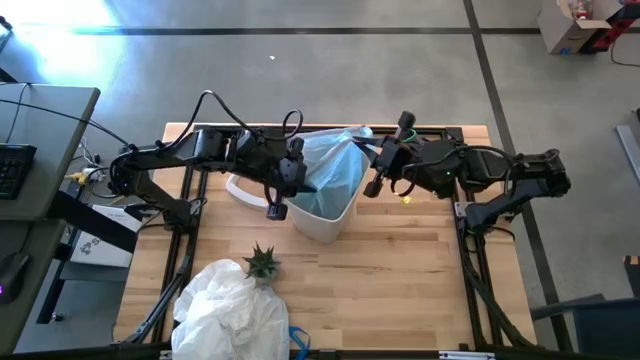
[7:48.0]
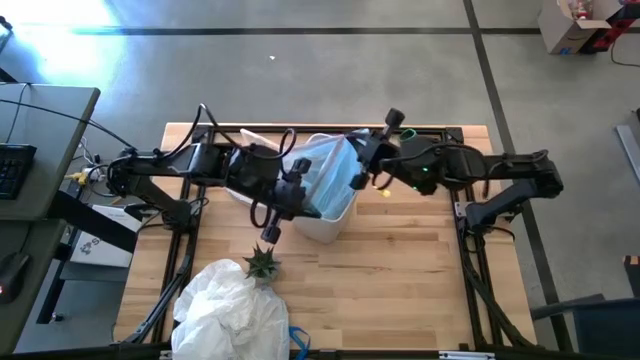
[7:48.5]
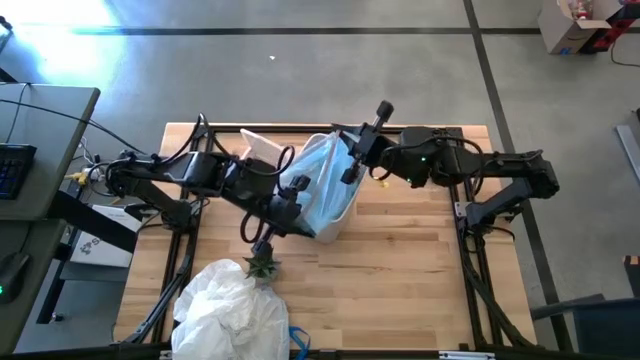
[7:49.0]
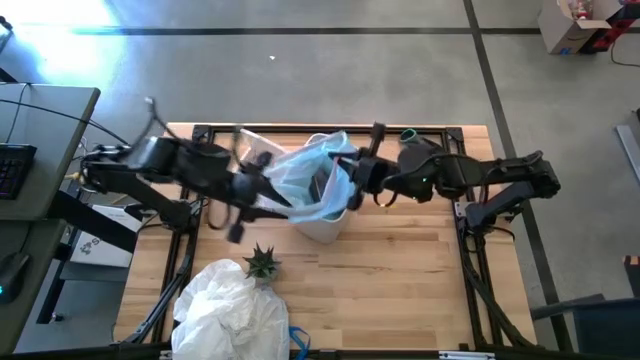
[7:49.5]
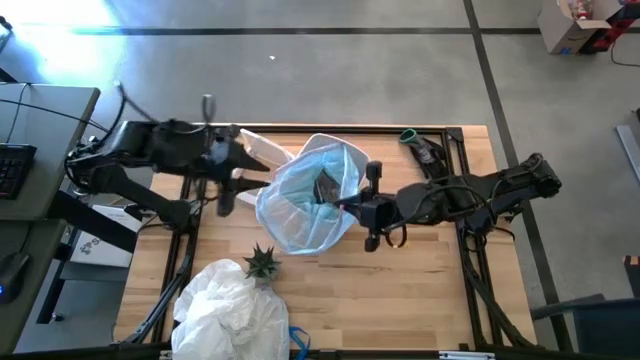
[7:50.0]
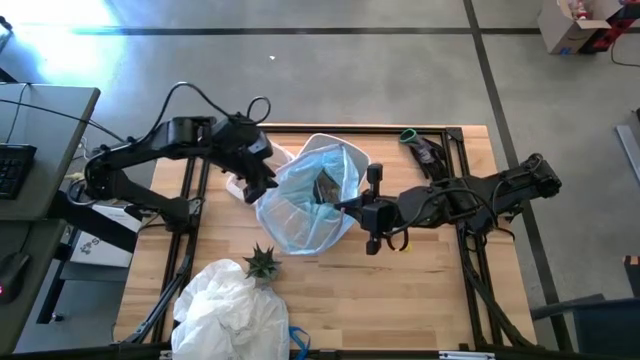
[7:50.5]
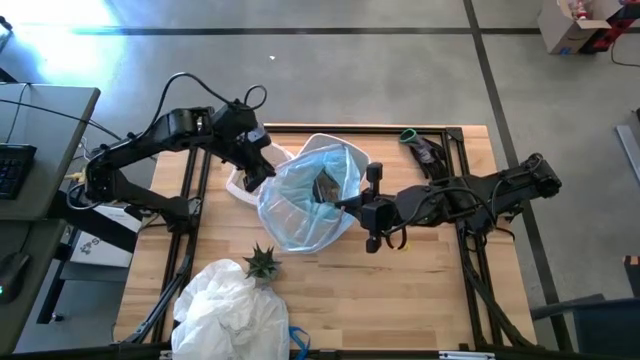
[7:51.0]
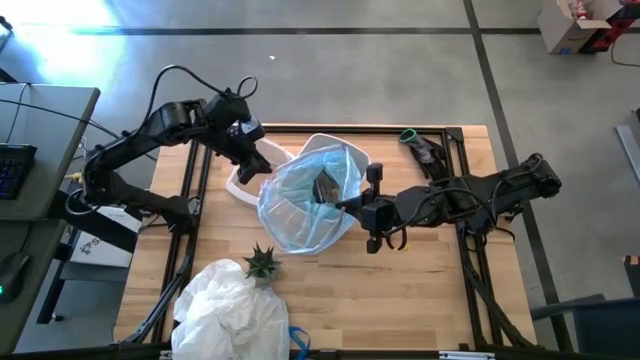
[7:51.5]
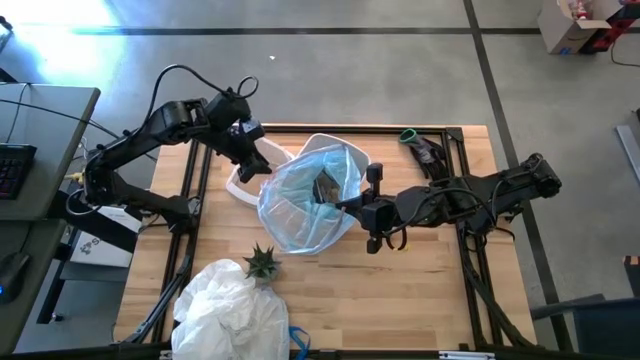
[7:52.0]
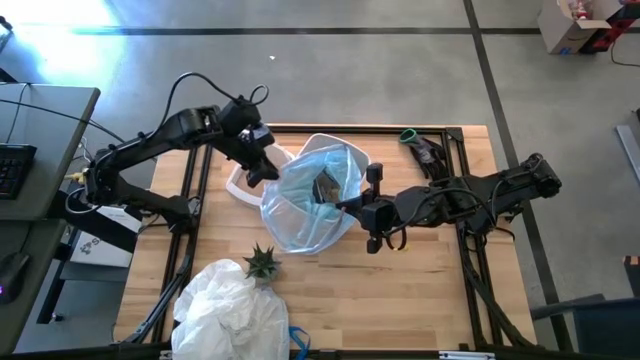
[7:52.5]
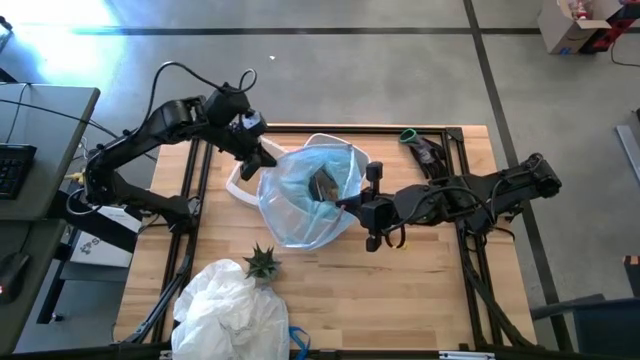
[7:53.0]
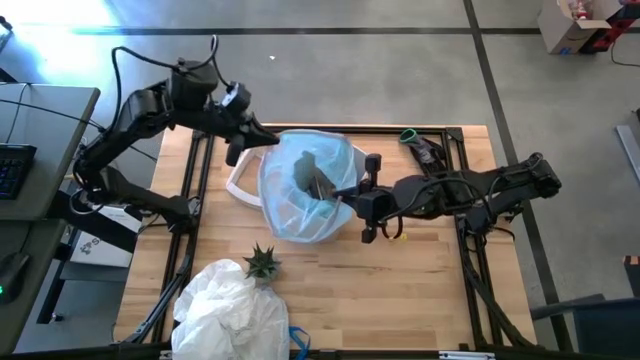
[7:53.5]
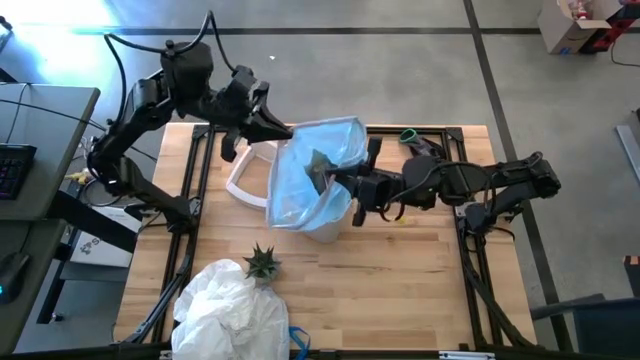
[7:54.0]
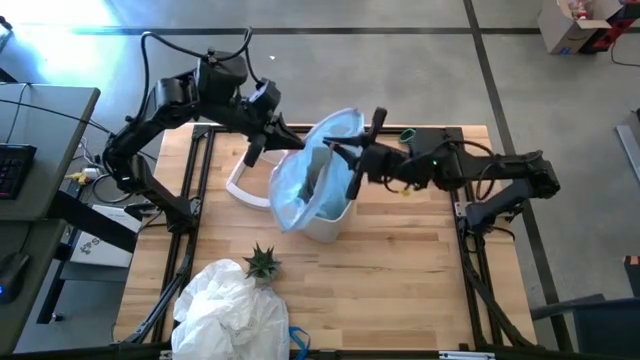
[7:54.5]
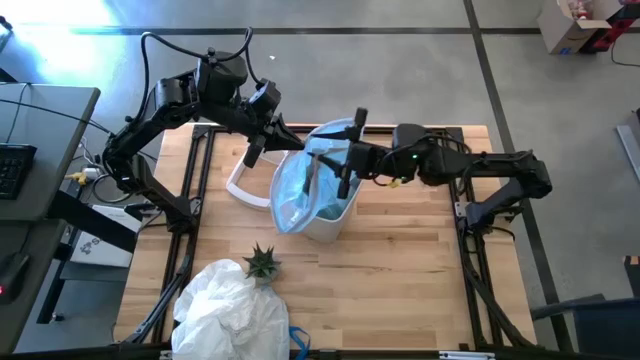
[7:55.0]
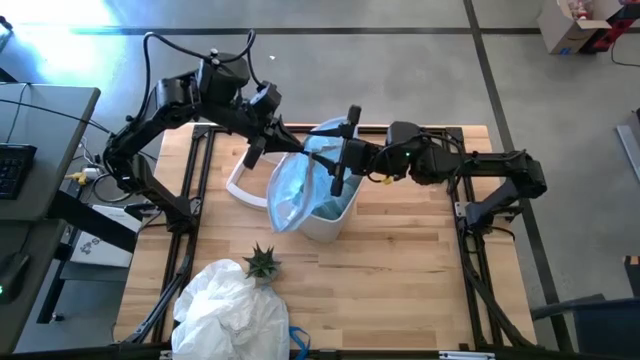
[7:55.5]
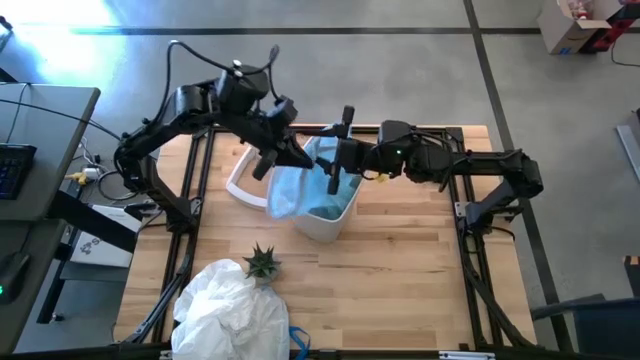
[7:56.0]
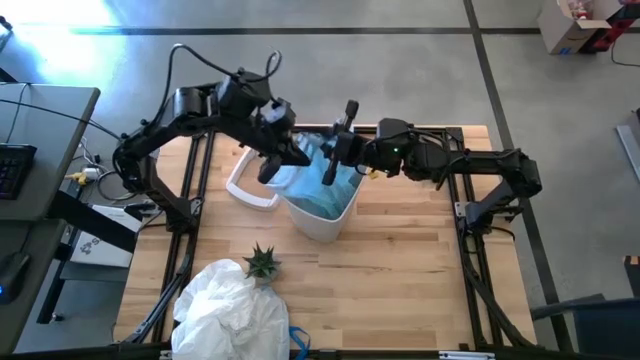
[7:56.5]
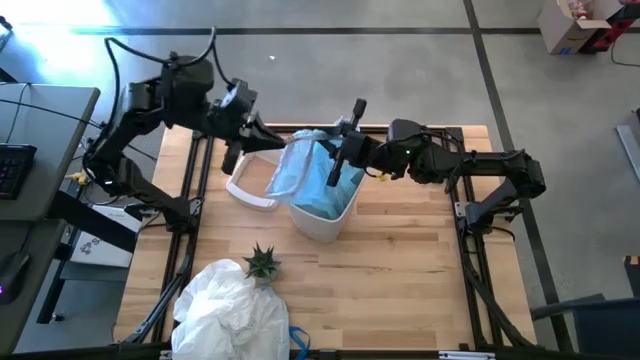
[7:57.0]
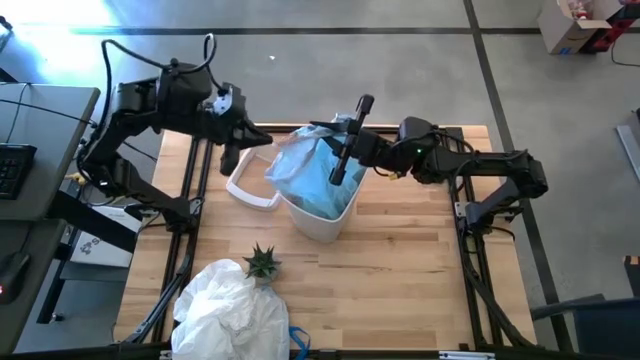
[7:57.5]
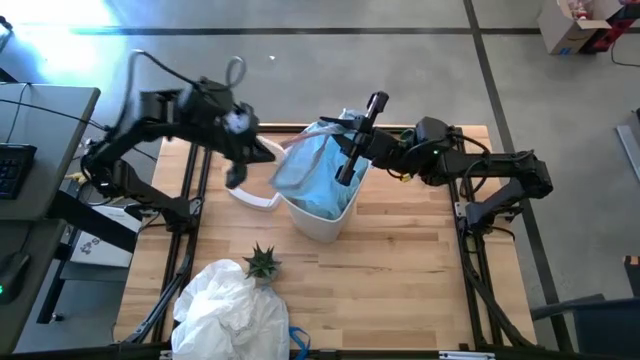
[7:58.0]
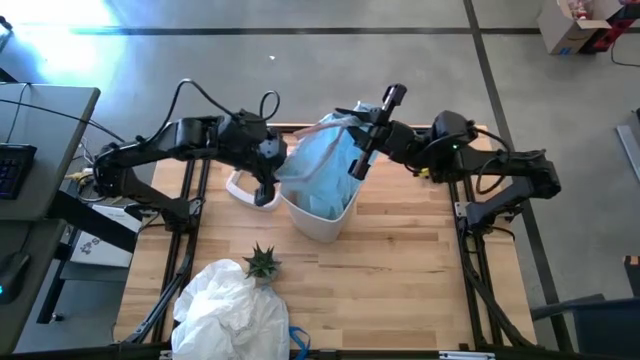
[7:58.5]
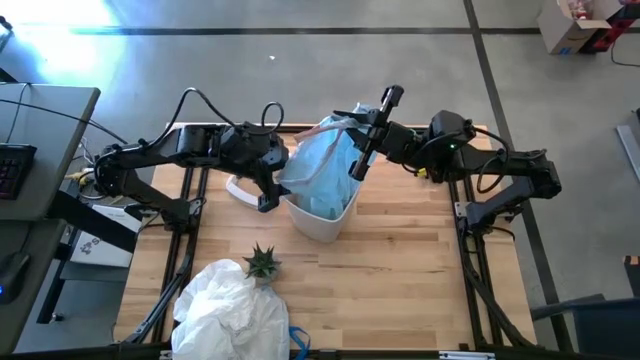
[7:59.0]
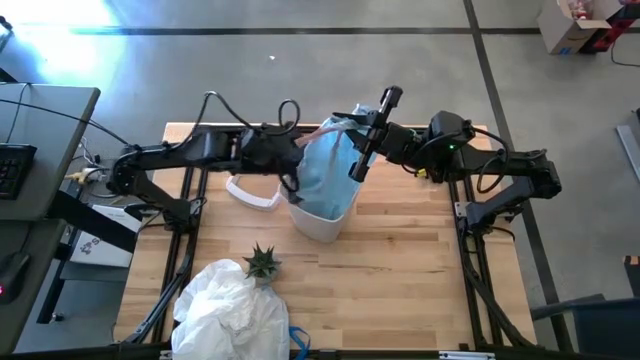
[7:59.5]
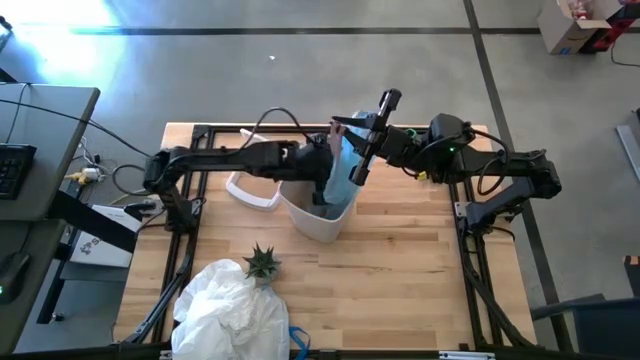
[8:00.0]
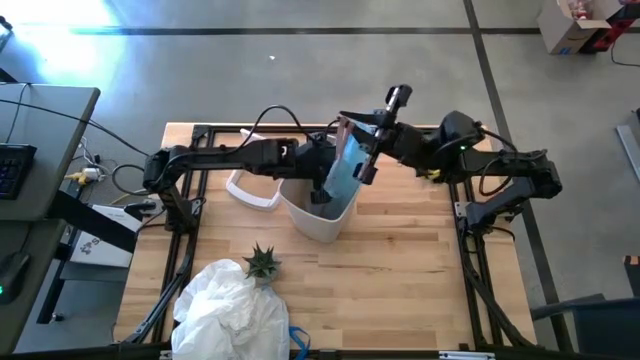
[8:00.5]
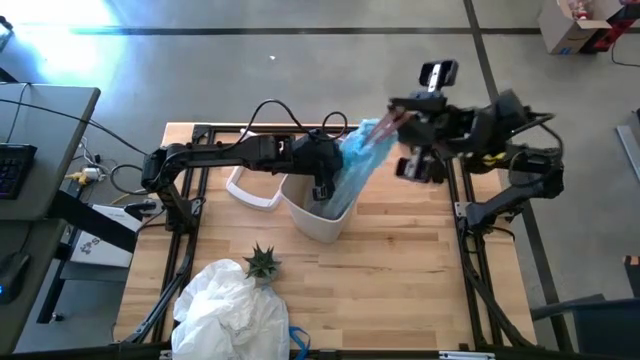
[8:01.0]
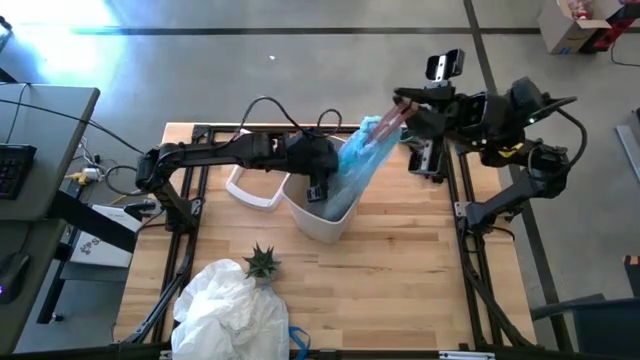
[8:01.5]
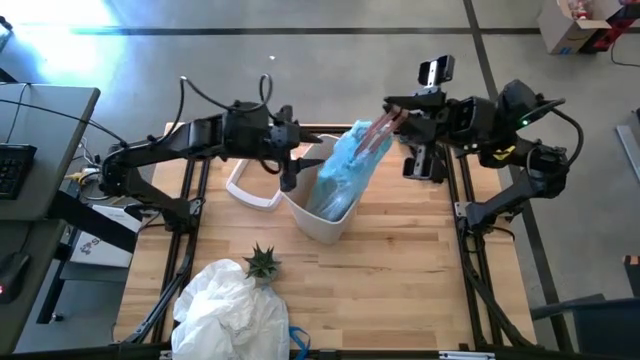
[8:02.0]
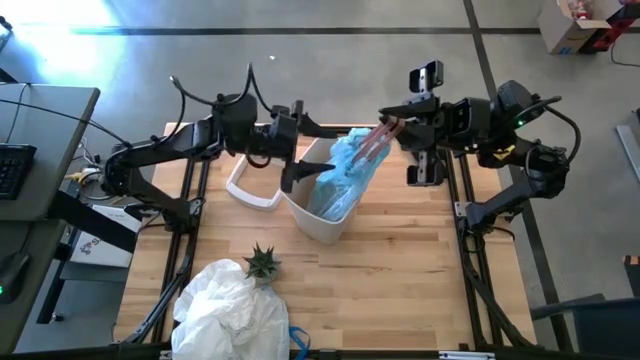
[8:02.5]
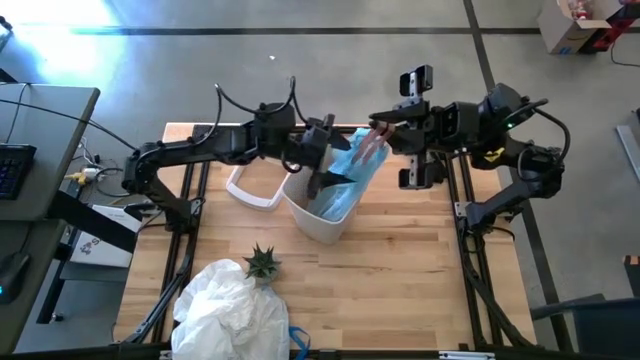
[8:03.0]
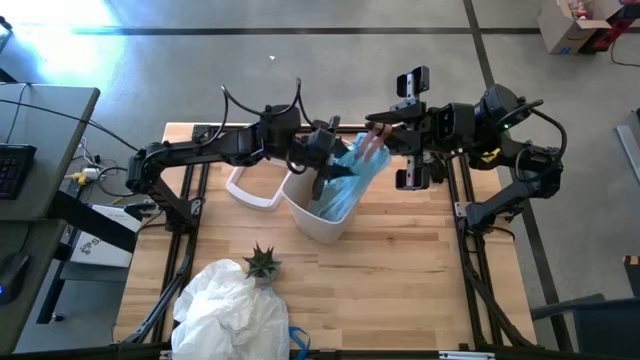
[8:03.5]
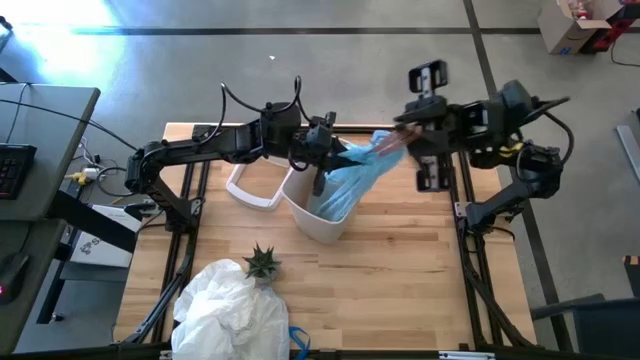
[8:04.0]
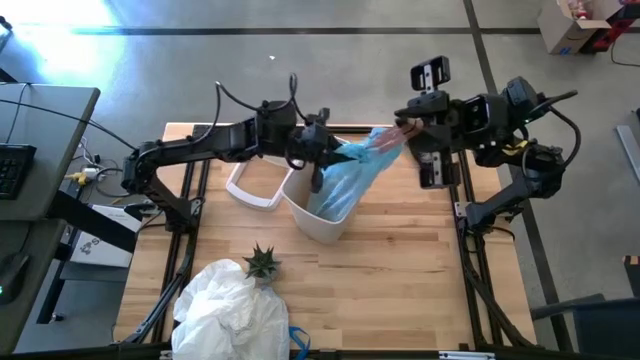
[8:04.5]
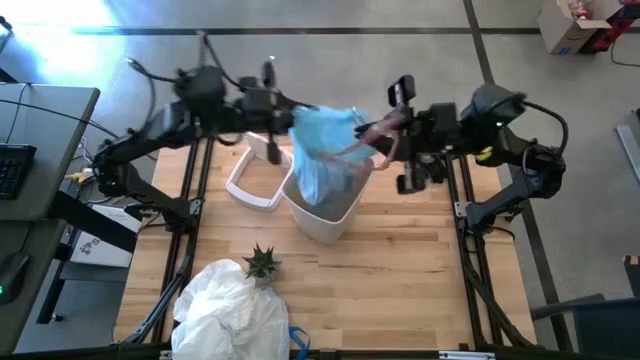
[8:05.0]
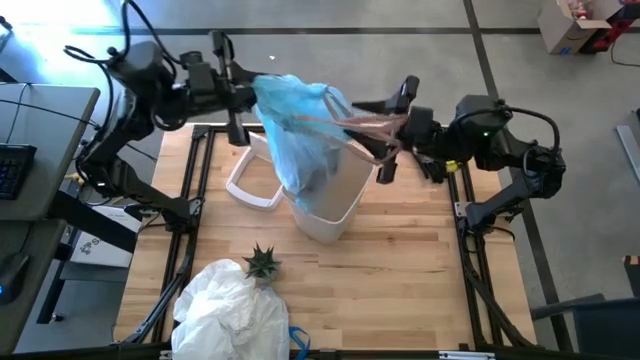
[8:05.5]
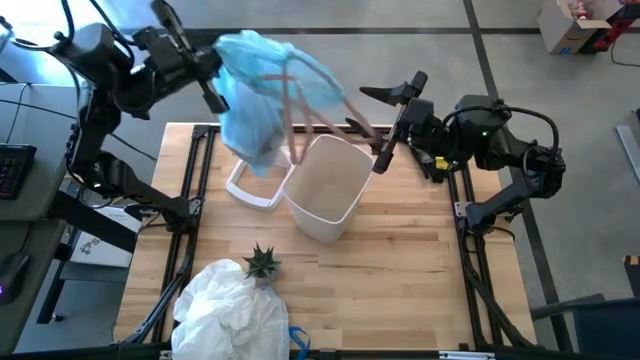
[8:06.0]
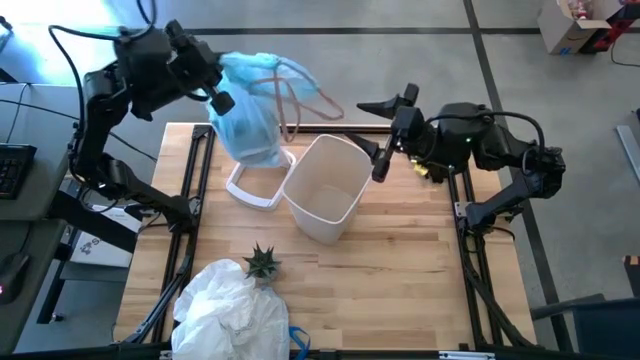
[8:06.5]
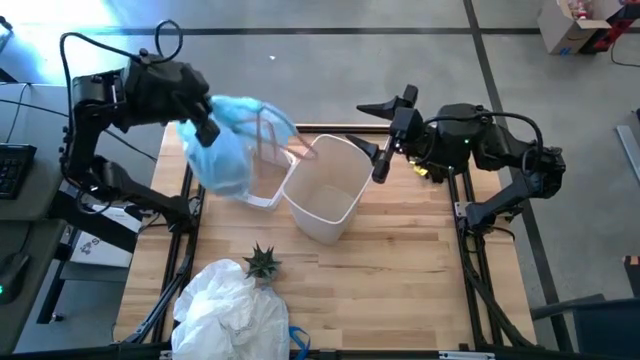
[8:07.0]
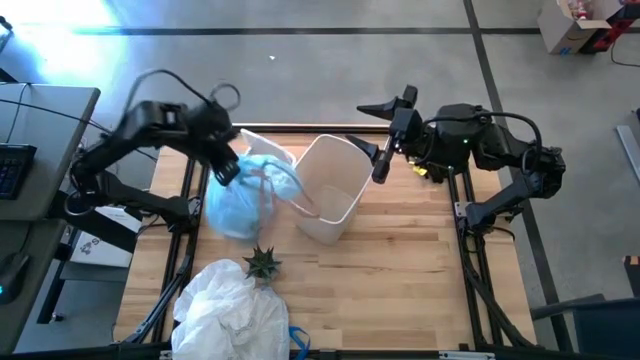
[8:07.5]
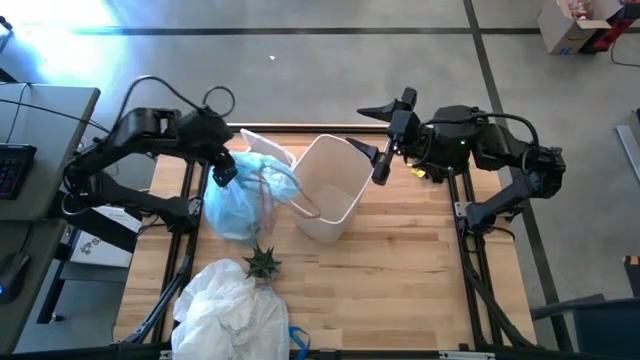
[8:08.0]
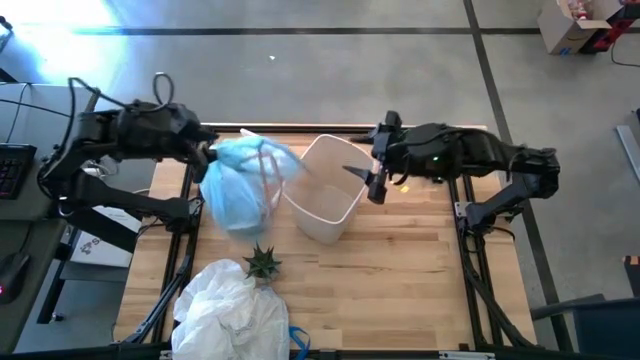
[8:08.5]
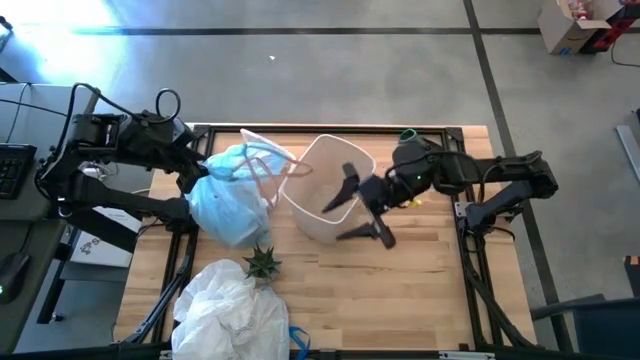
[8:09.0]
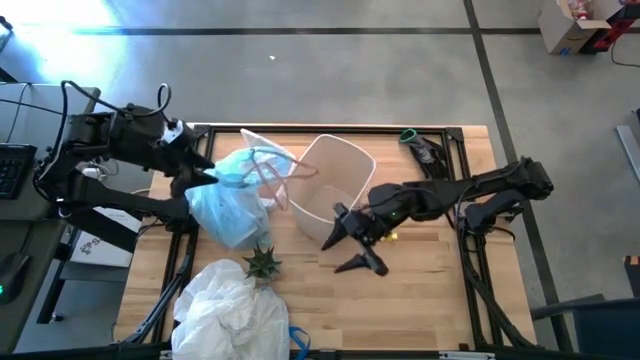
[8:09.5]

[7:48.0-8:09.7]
Task: place trash/remove bag and relplace
Remove the trash bag from the trash bin
